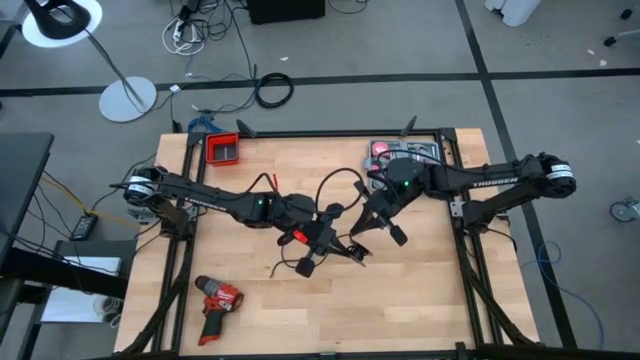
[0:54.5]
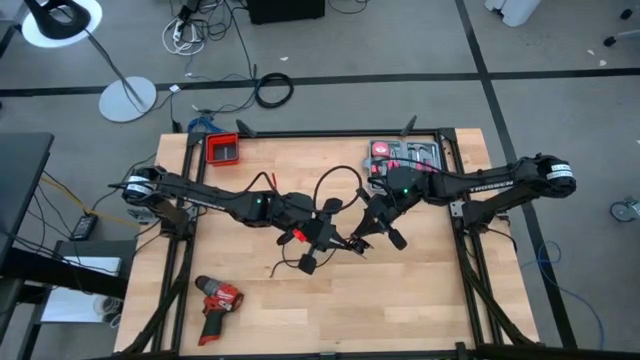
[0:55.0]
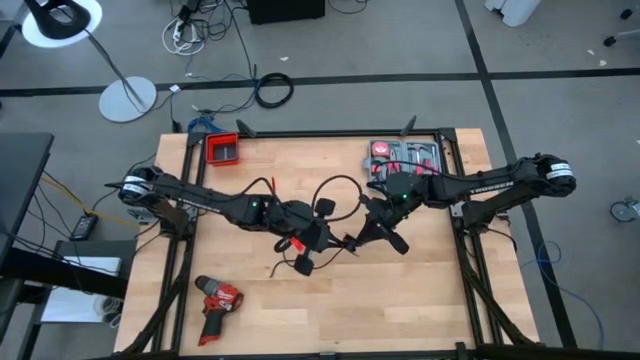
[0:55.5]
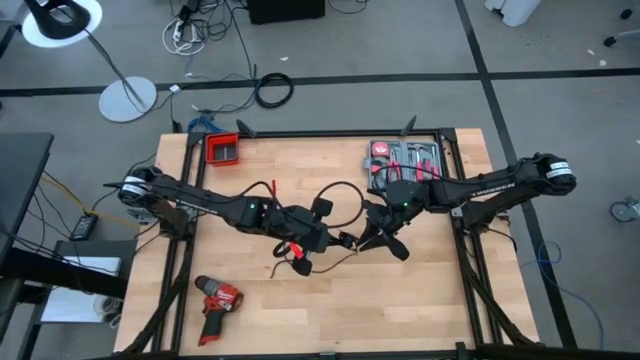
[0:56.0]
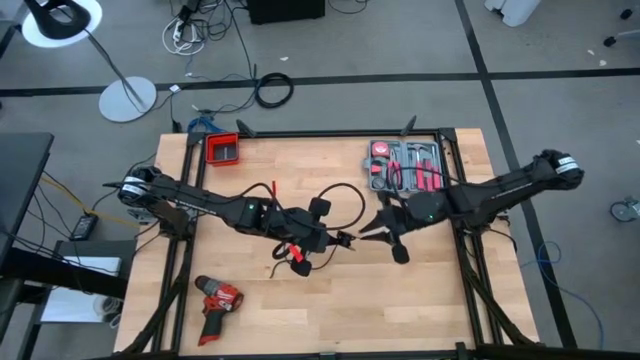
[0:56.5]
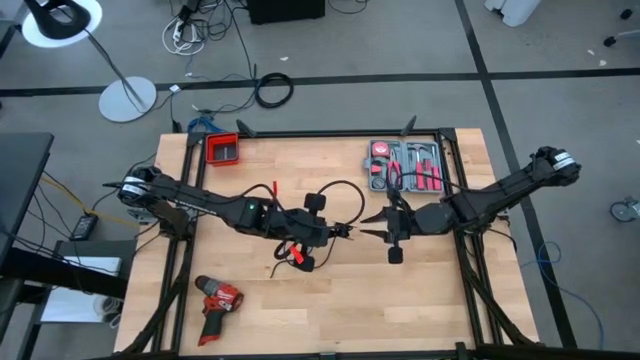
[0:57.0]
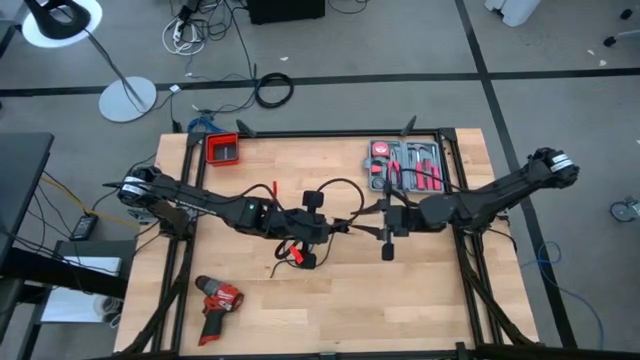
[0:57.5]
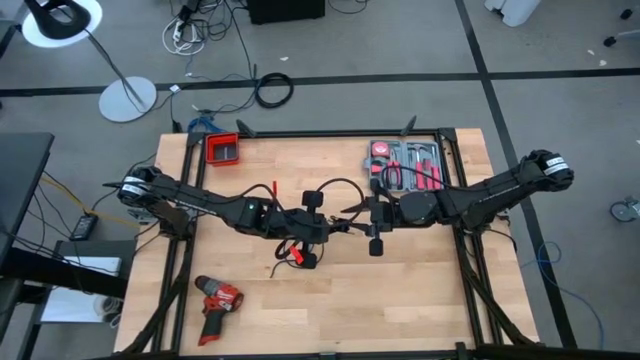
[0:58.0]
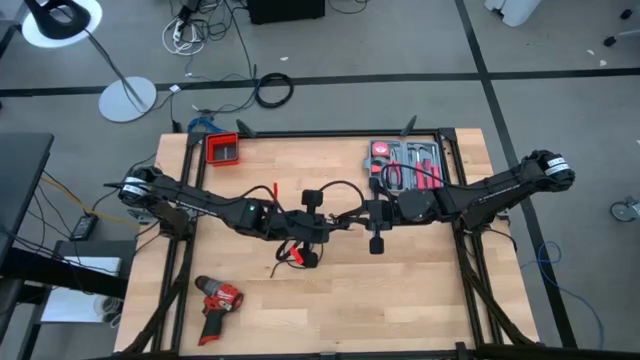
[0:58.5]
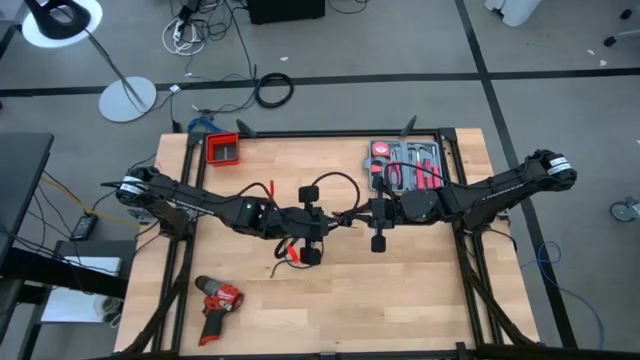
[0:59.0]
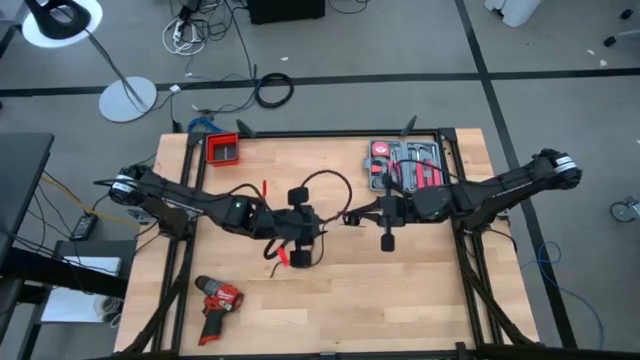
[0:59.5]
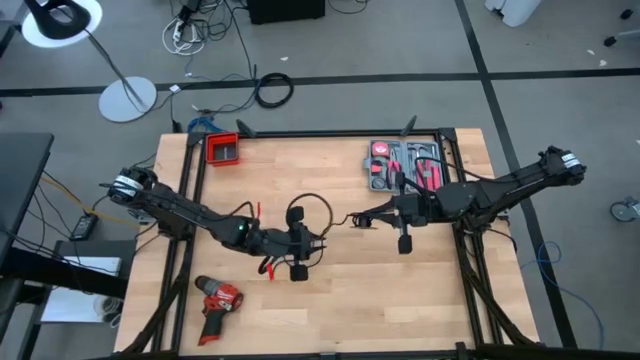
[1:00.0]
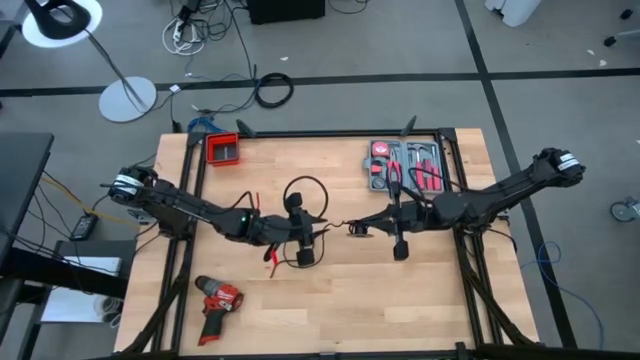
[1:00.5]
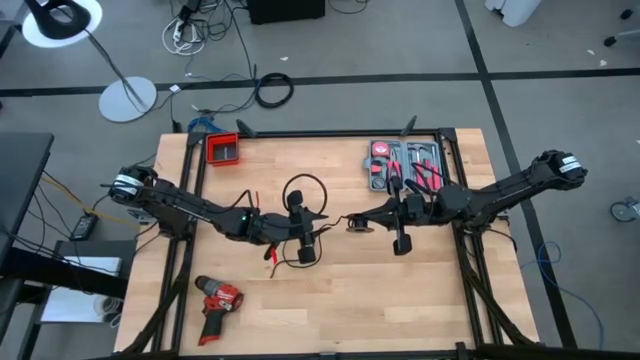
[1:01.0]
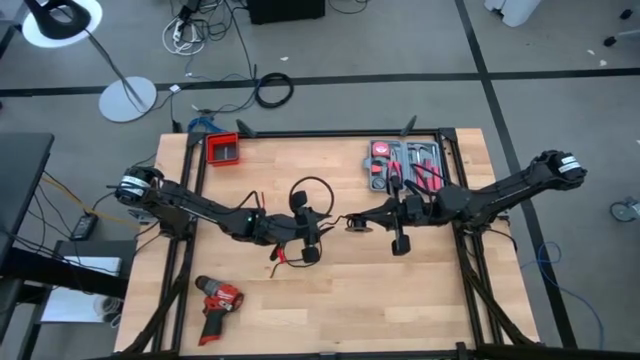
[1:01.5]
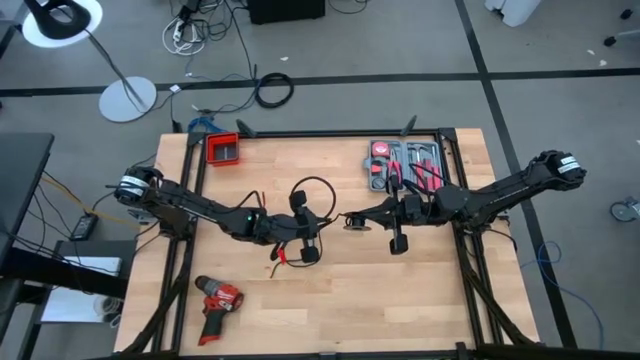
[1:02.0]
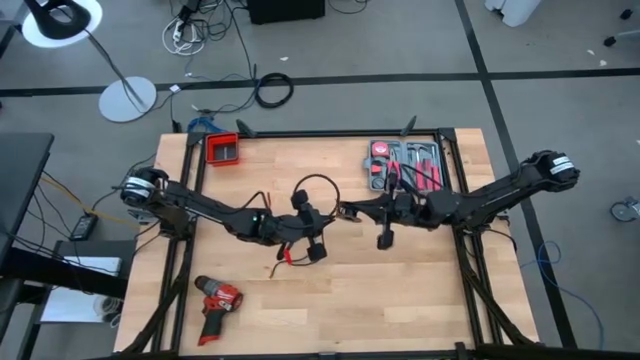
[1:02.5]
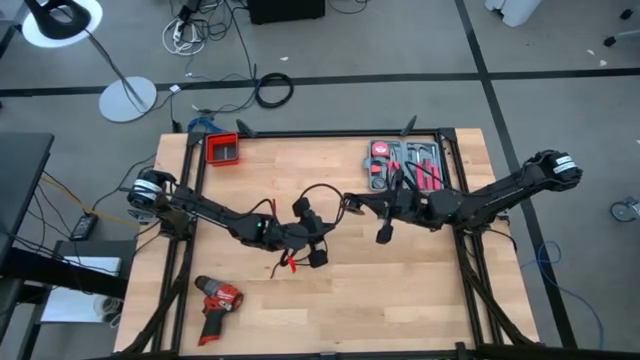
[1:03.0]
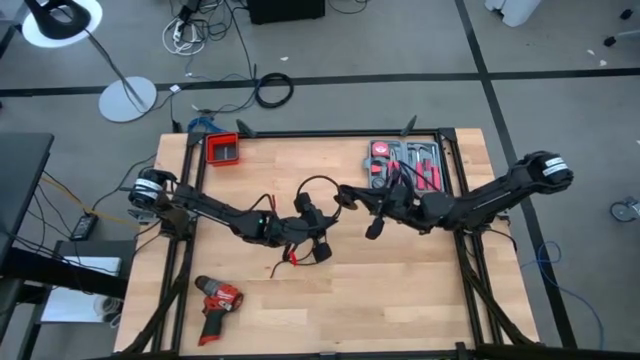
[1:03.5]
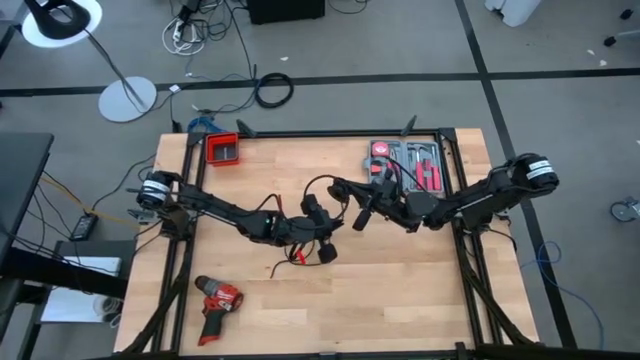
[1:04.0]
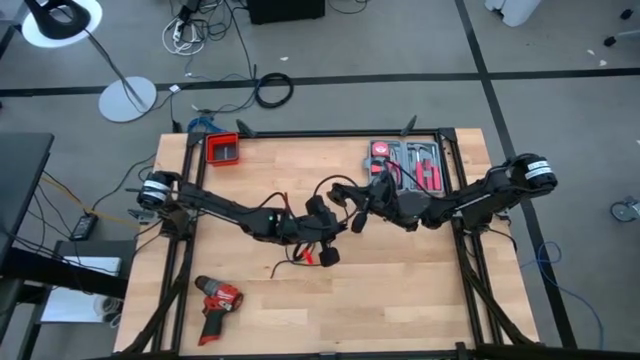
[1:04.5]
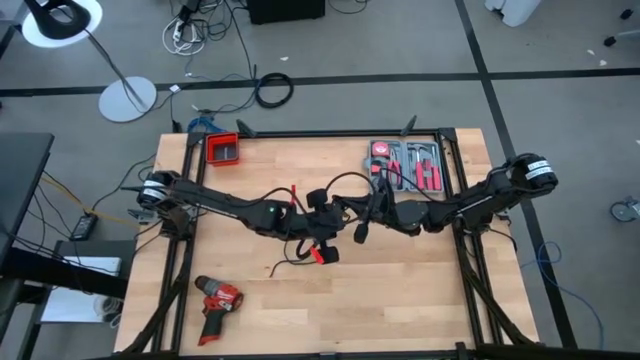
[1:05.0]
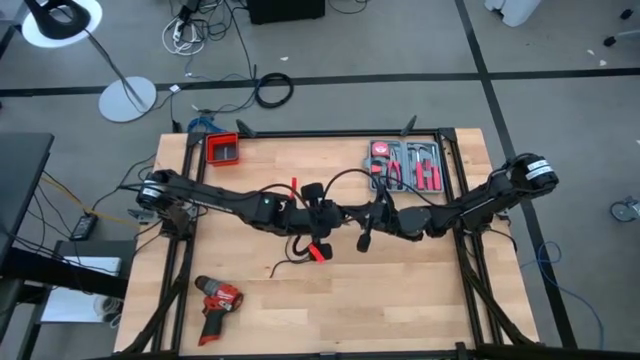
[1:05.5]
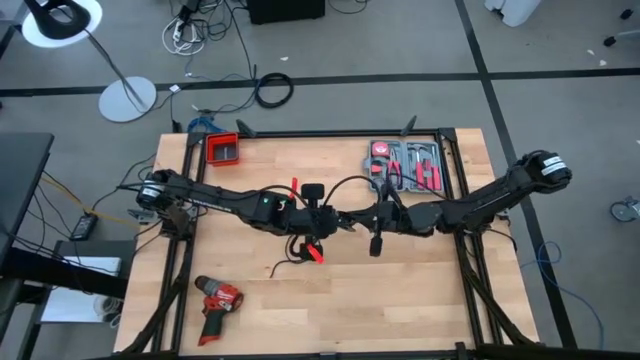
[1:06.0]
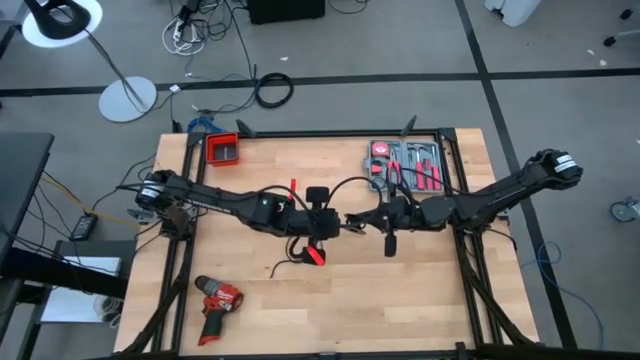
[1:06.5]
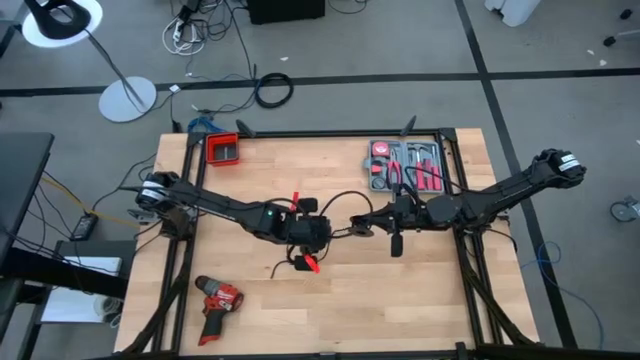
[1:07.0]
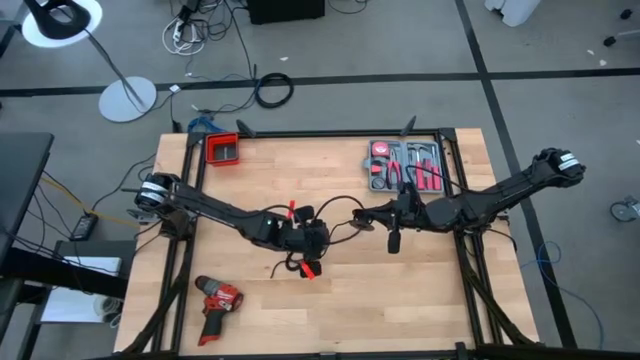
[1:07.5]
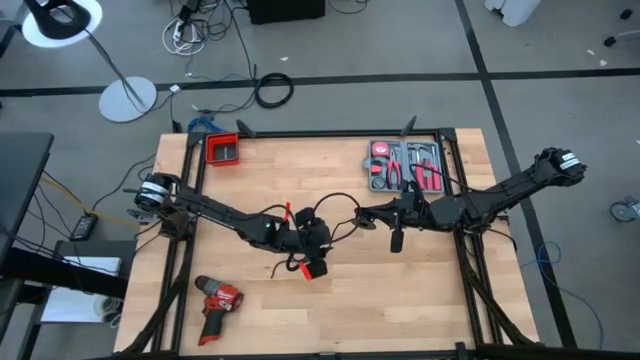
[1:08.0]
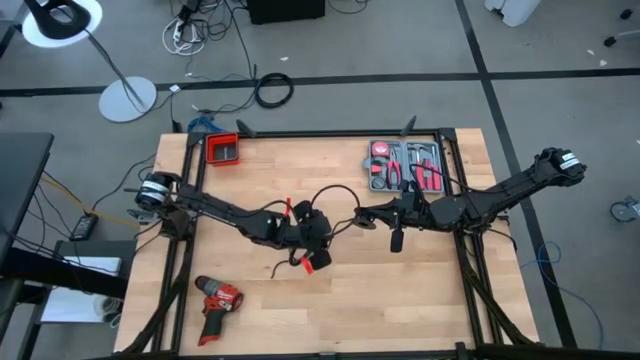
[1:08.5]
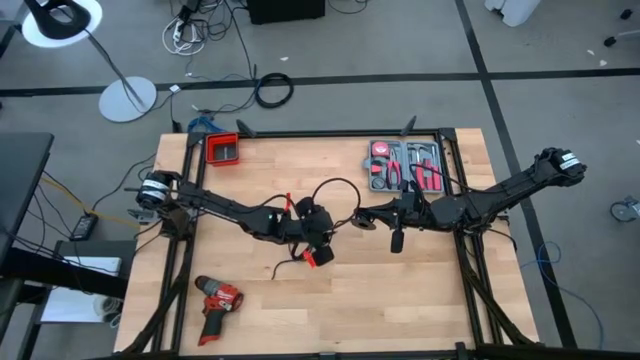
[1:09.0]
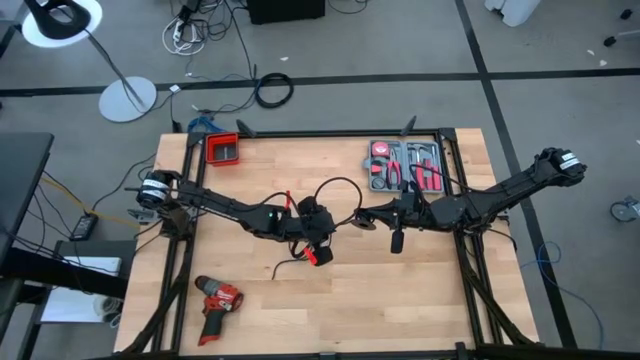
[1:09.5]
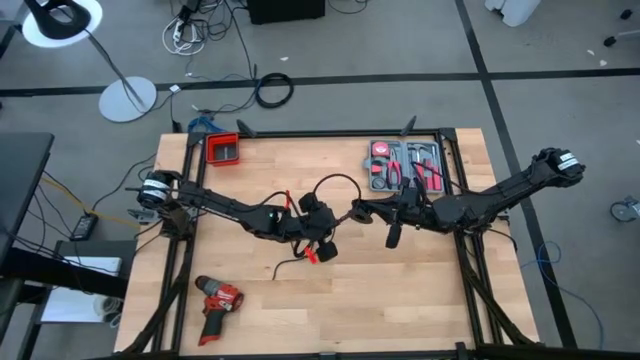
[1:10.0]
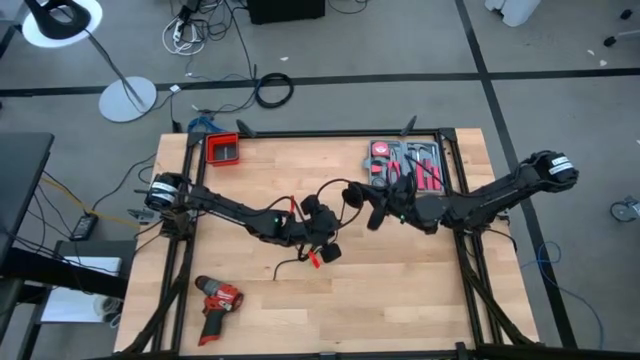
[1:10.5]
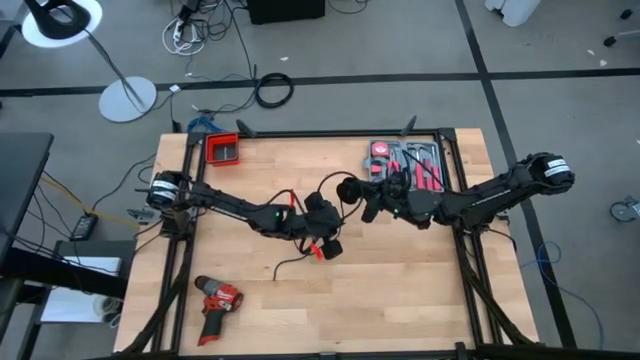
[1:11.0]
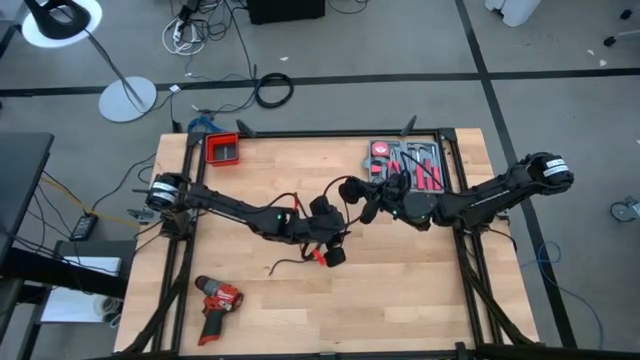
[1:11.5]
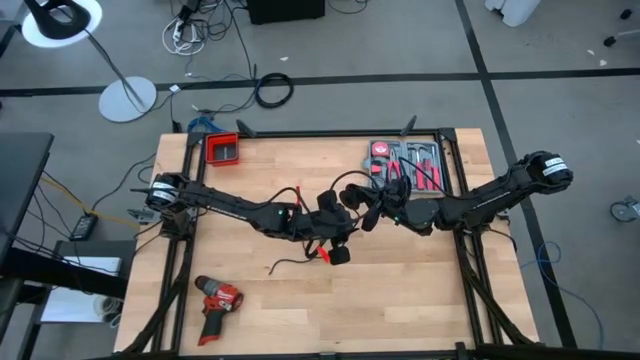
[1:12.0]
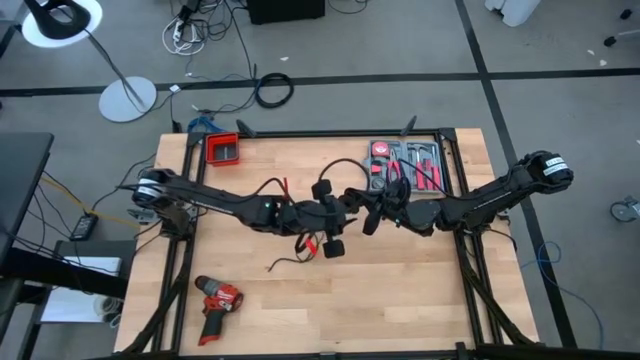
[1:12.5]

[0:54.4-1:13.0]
Task: Coil cords
Coil the black wire onto the black spool

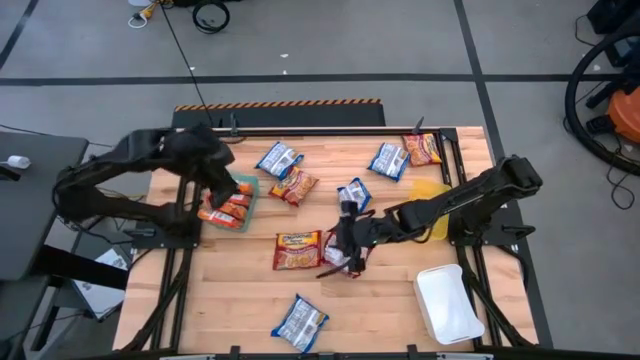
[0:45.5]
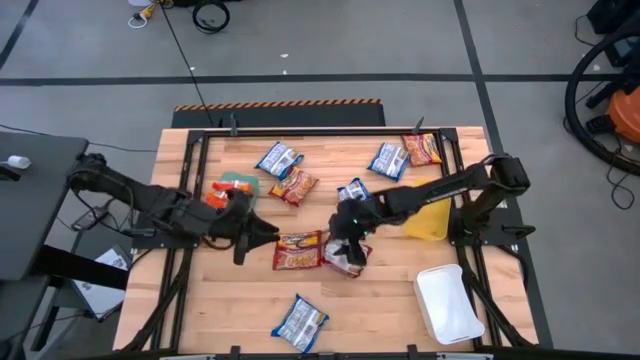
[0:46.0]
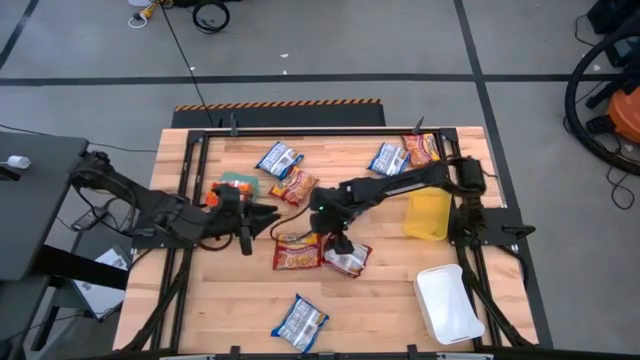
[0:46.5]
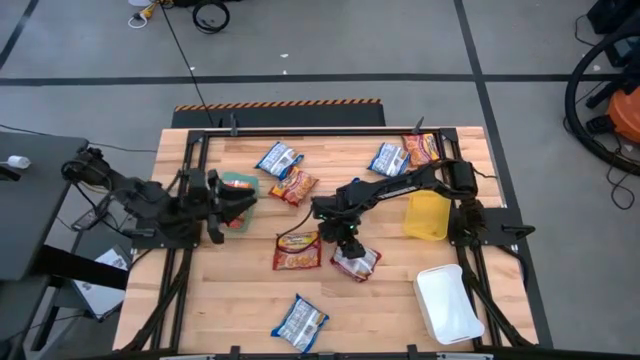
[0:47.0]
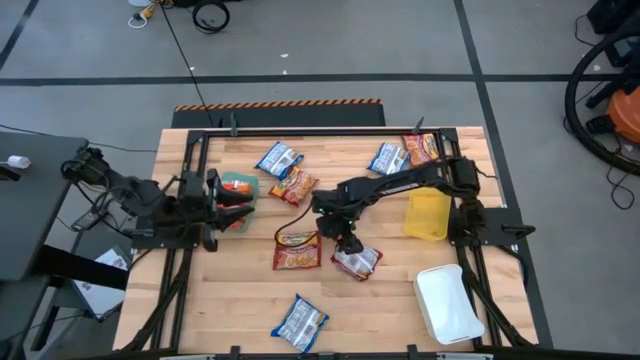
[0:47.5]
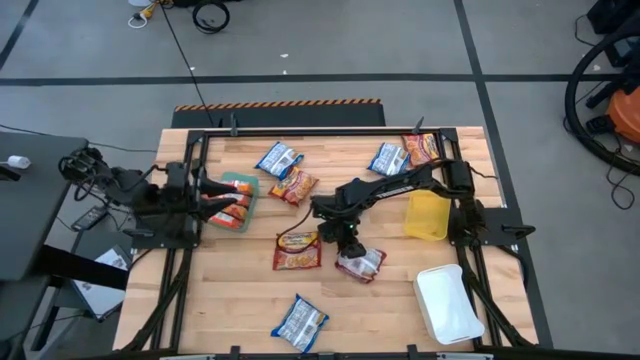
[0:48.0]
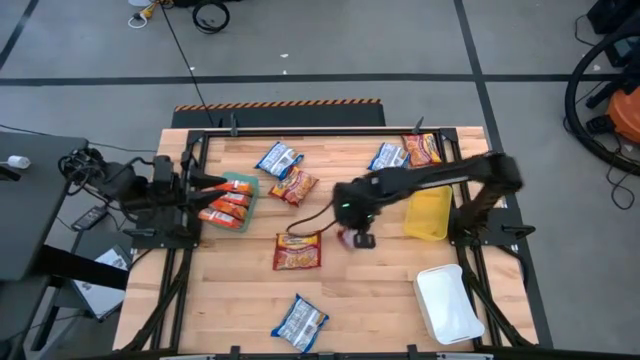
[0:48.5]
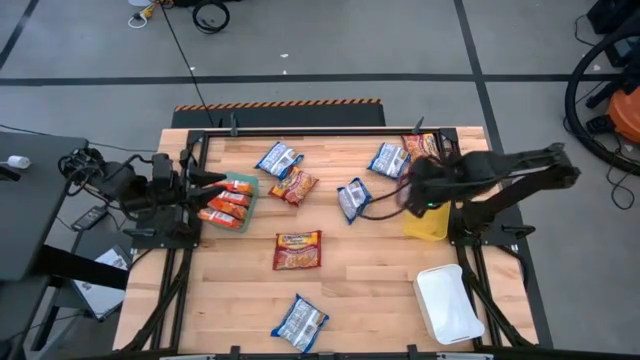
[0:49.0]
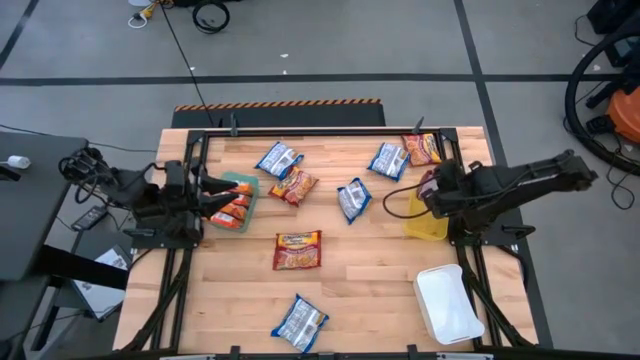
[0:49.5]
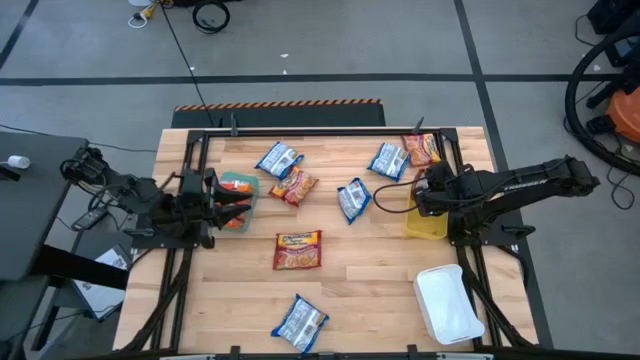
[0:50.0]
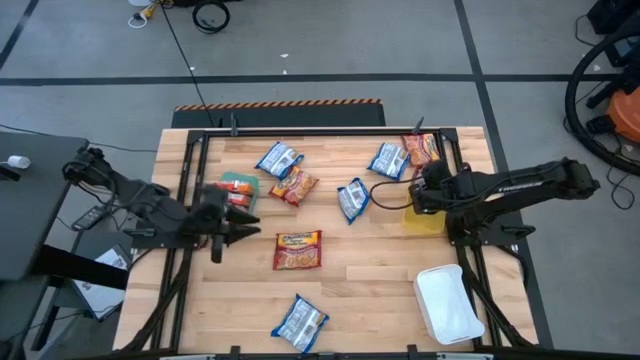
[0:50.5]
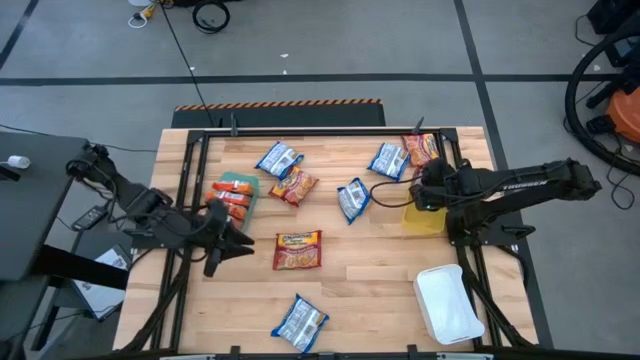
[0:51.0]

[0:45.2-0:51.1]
Task: Sort Maruchan noodles
Put the red noodle pack into the yellow bin
